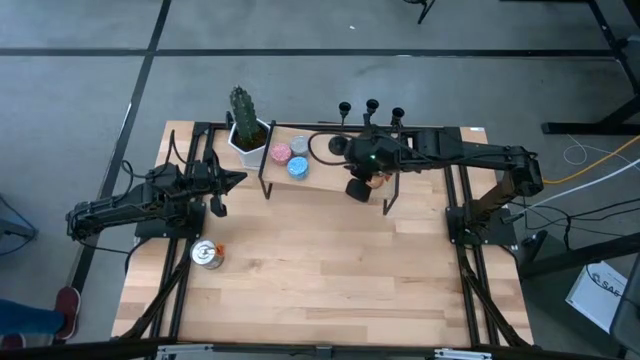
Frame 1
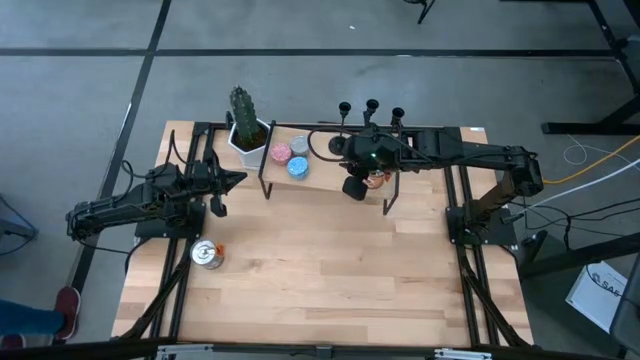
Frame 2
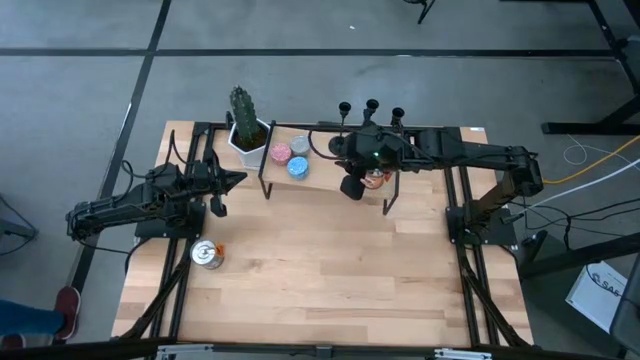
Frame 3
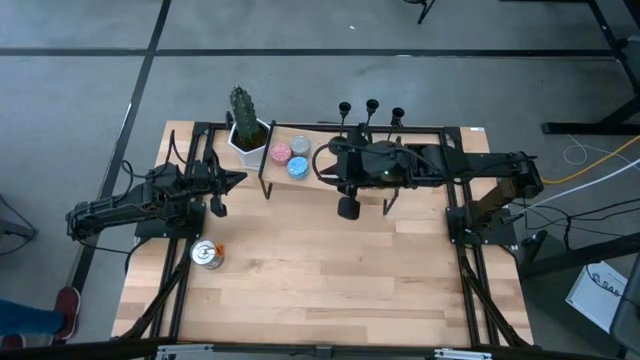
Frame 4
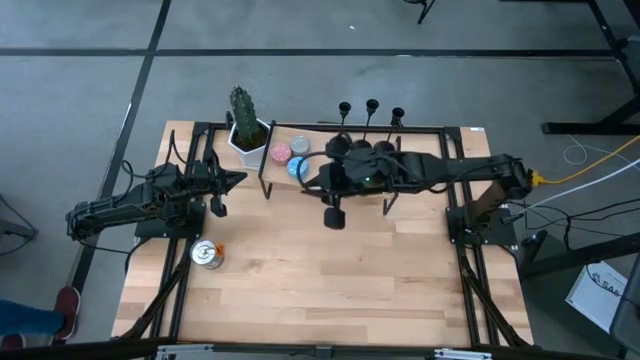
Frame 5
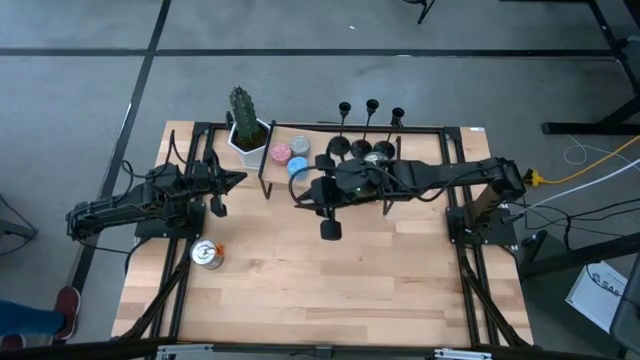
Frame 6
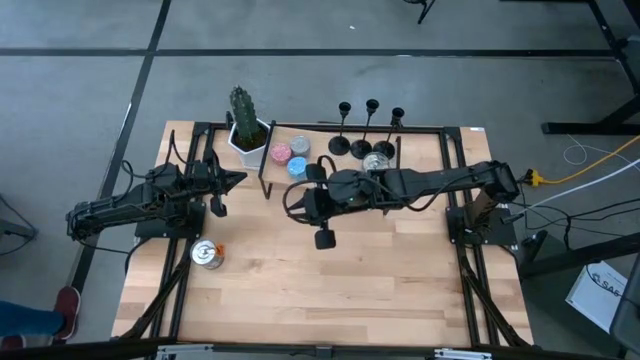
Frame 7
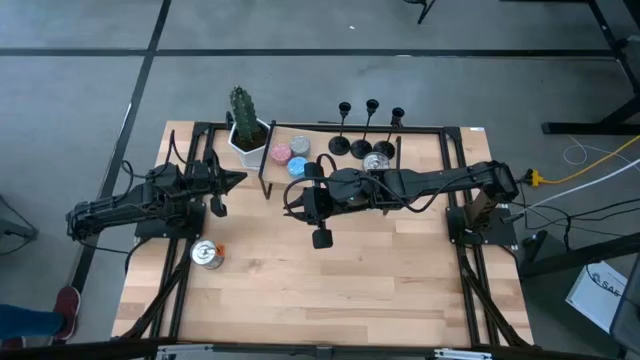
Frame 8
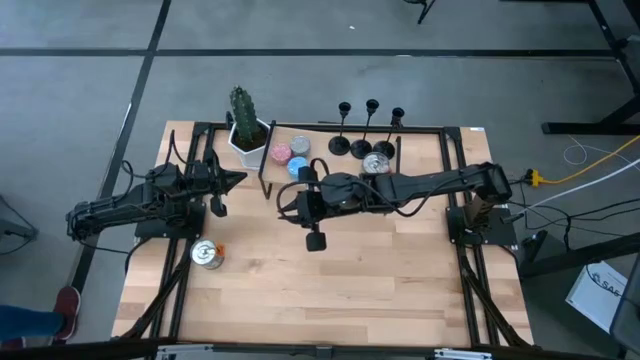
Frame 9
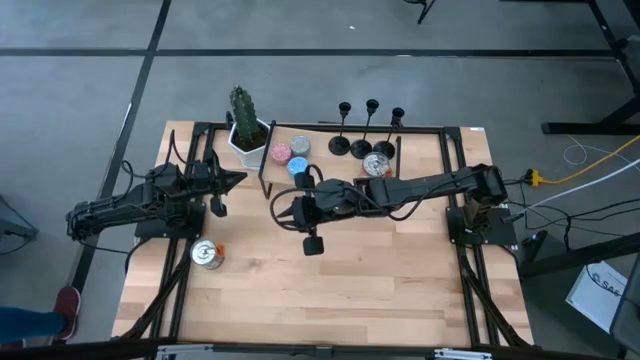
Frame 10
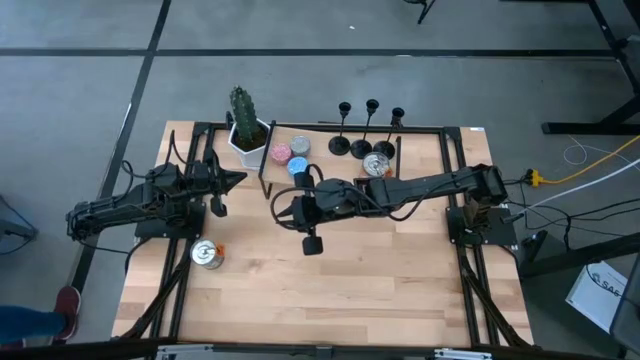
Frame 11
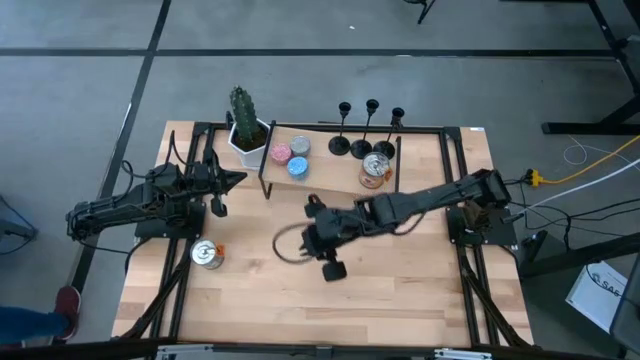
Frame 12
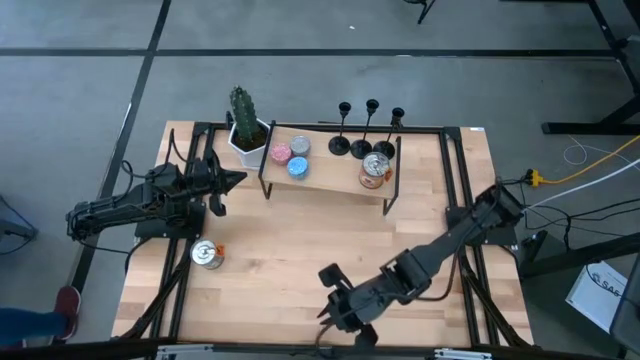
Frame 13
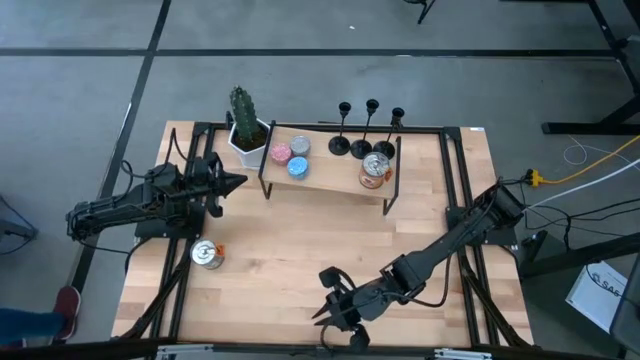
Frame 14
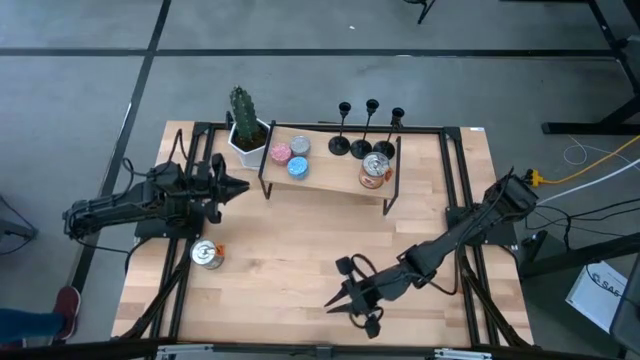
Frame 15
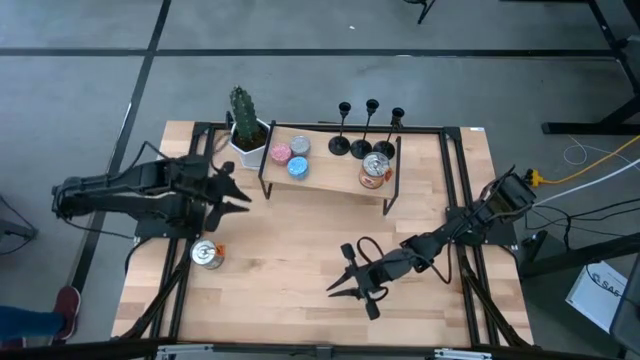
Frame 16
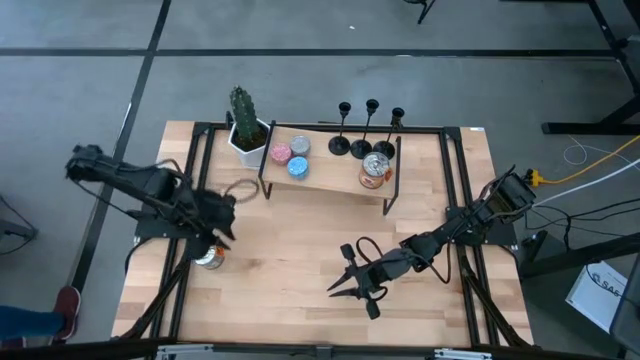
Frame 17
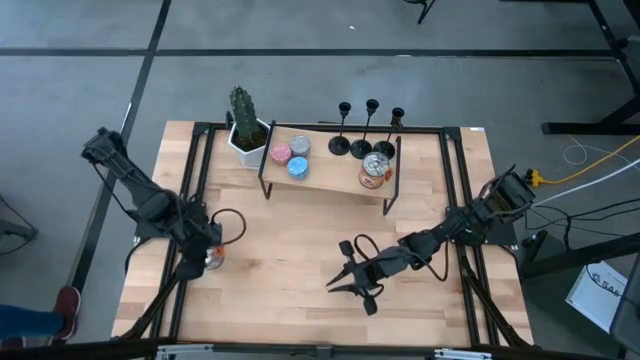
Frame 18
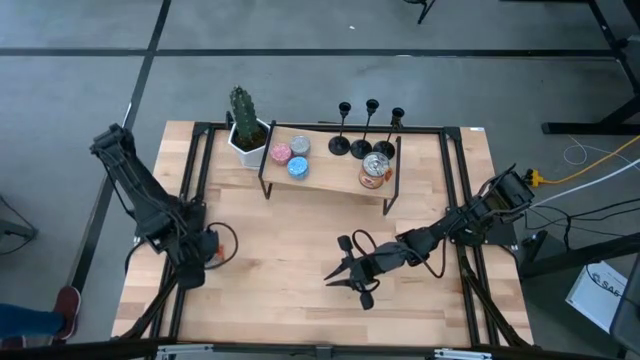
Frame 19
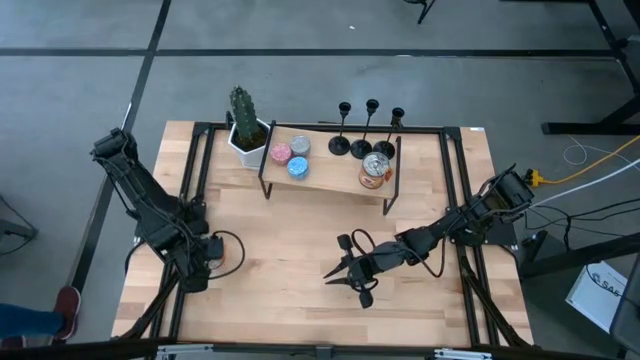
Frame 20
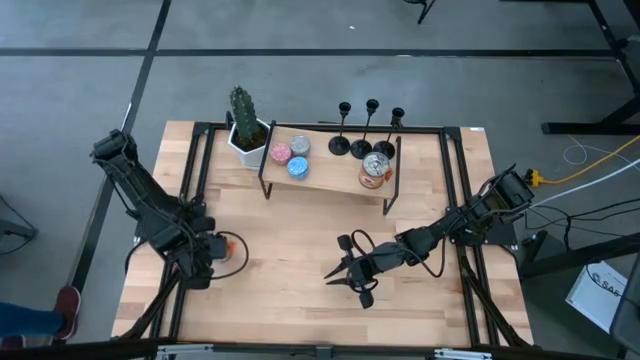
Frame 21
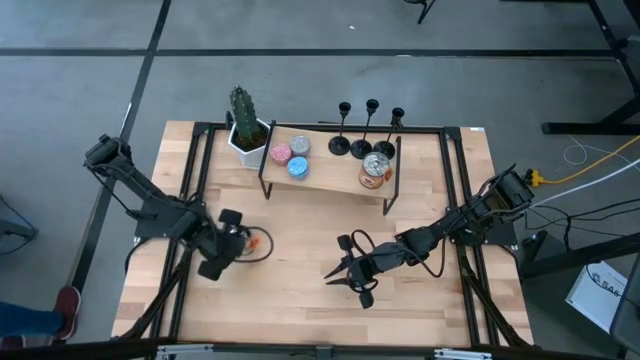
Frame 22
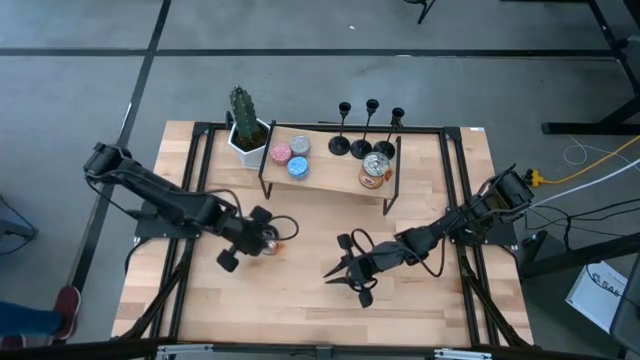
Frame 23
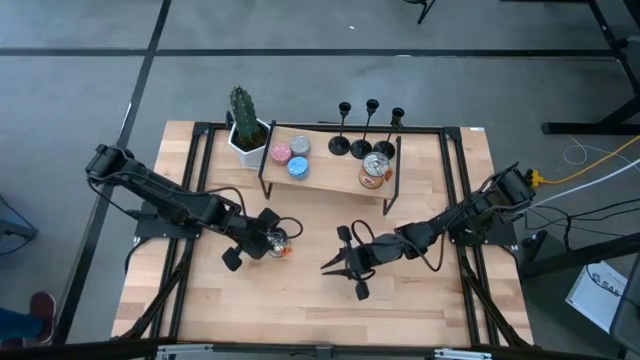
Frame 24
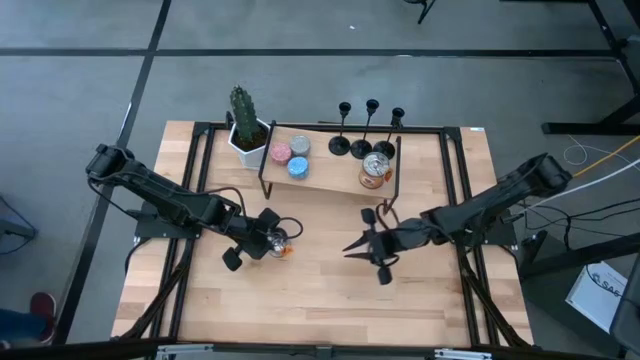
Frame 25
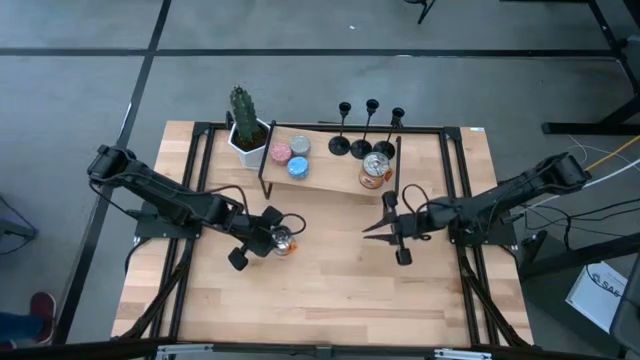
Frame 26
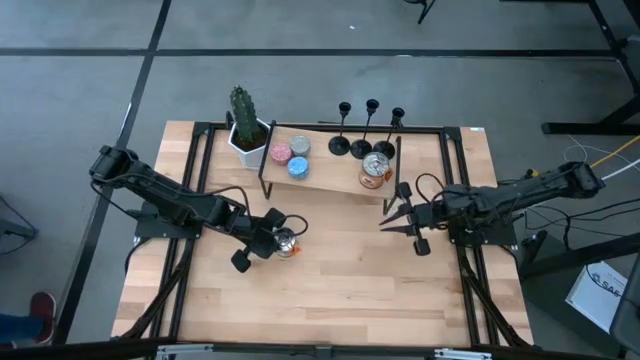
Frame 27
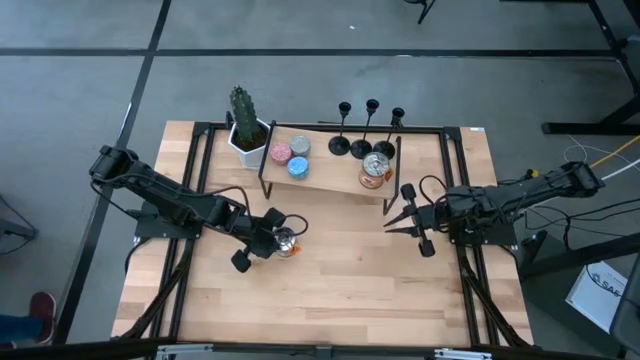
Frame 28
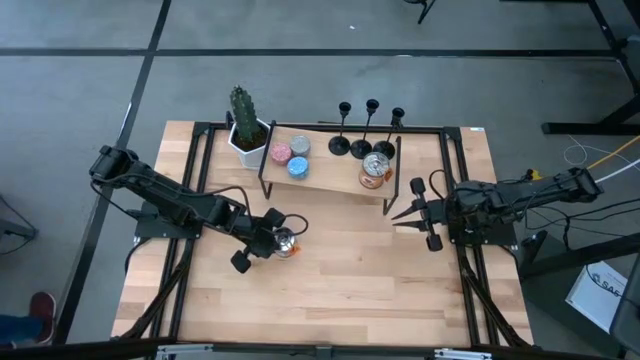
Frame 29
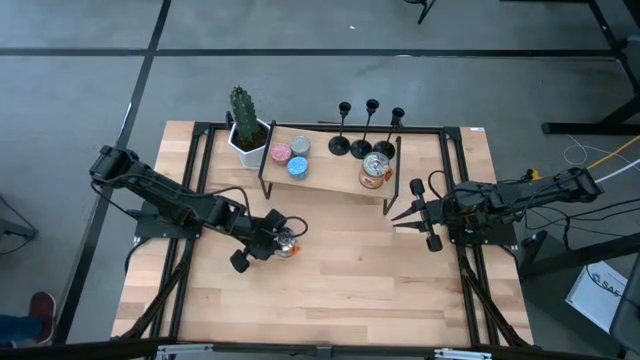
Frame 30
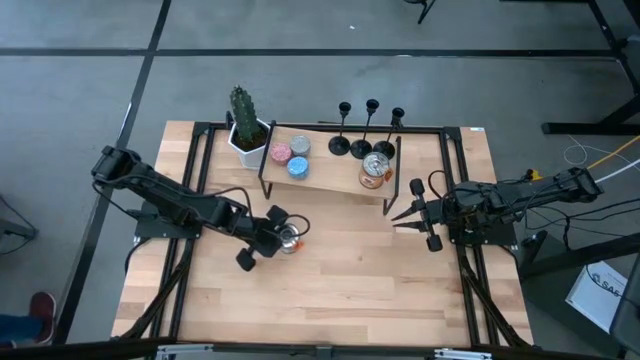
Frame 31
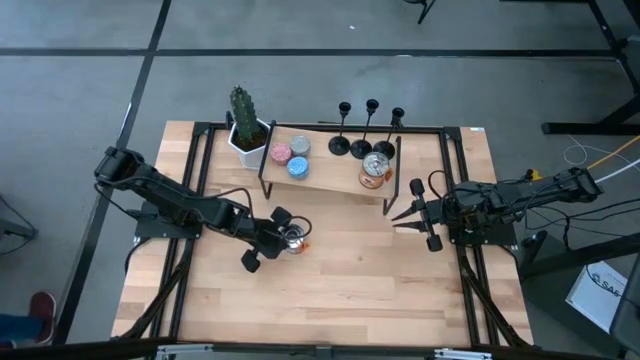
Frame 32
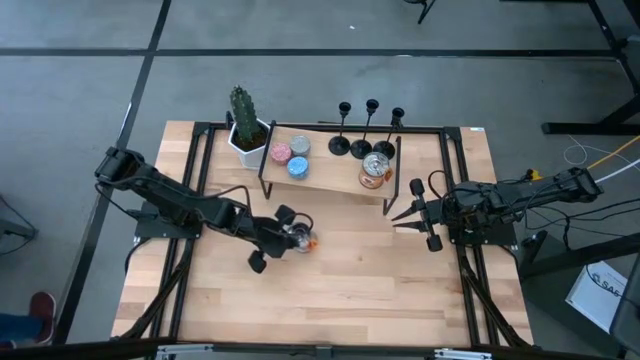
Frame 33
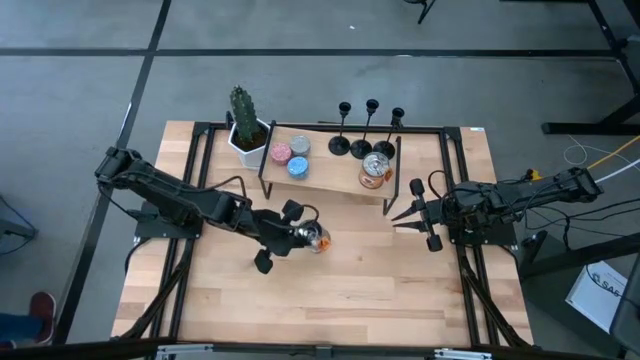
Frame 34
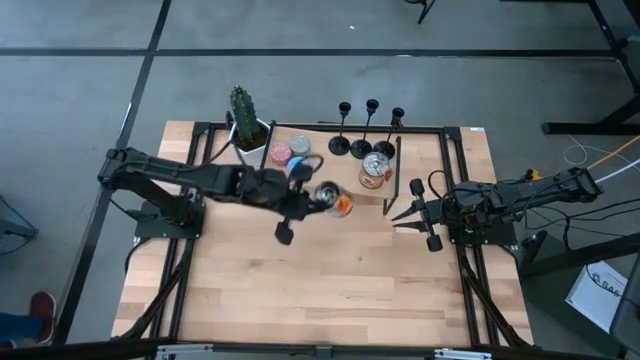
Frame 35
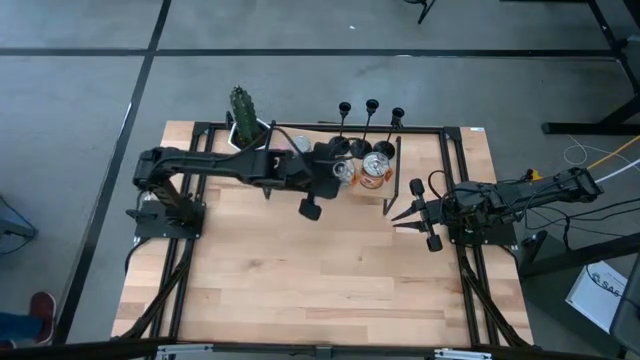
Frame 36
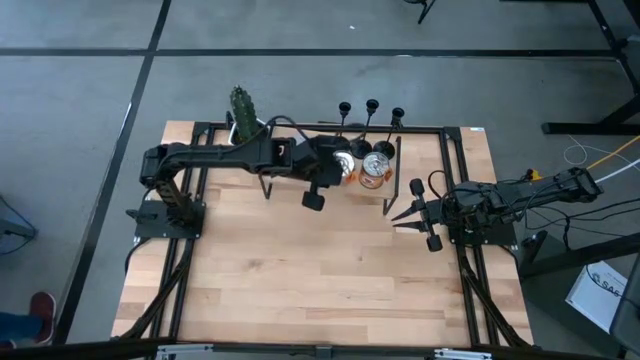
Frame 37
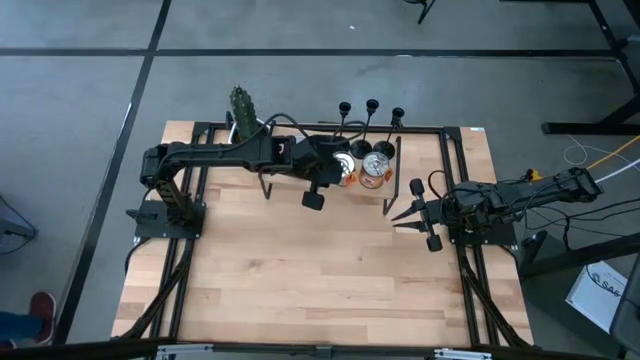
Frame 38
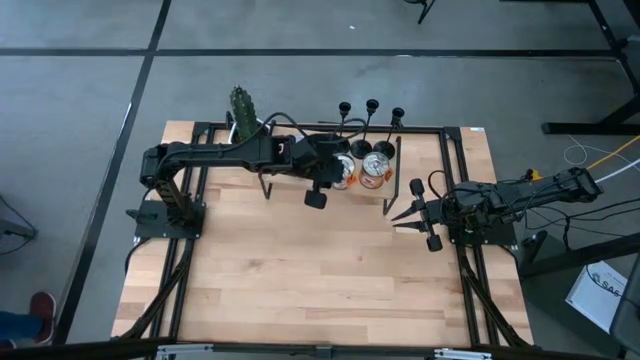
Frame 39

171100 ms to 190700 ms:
Task: Pick & Place candle stick holders
Put the silver scented candle on the shelf

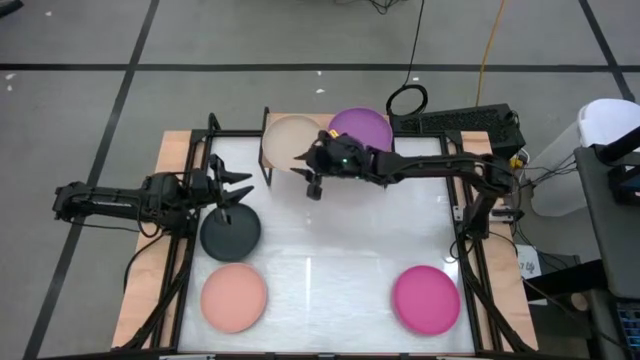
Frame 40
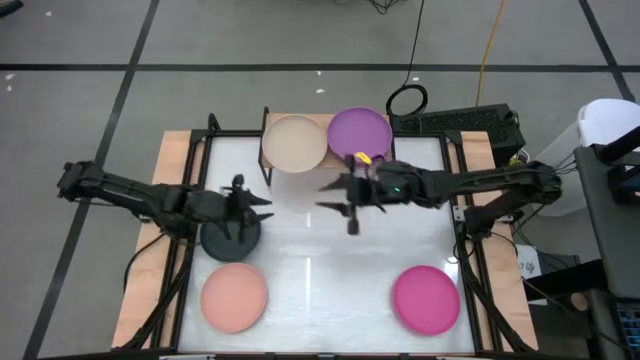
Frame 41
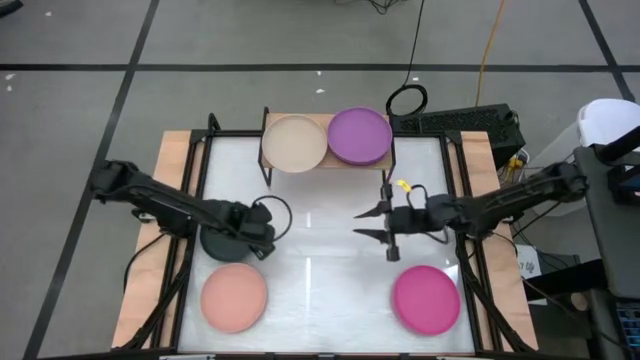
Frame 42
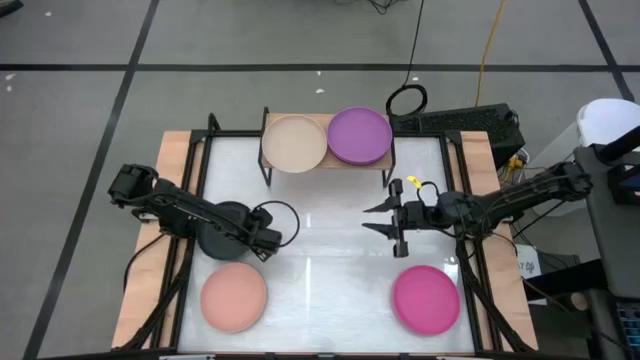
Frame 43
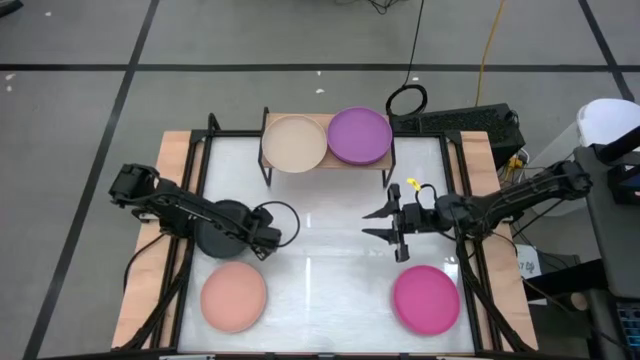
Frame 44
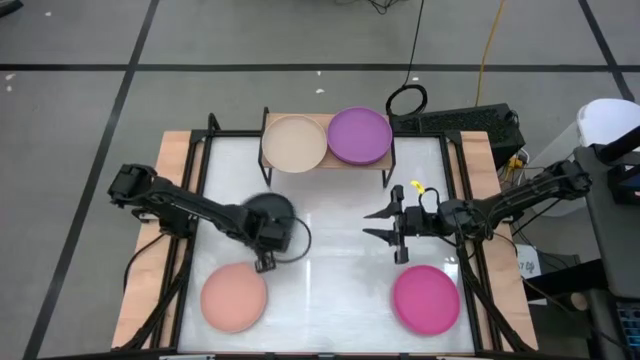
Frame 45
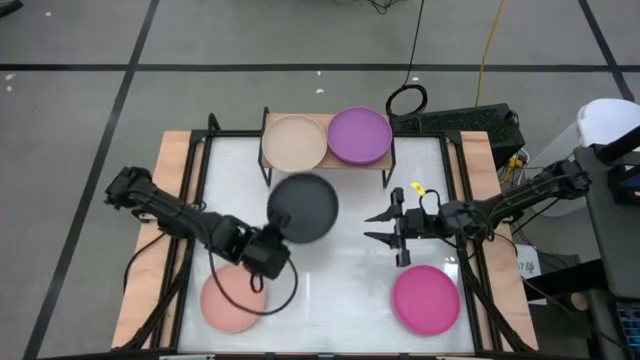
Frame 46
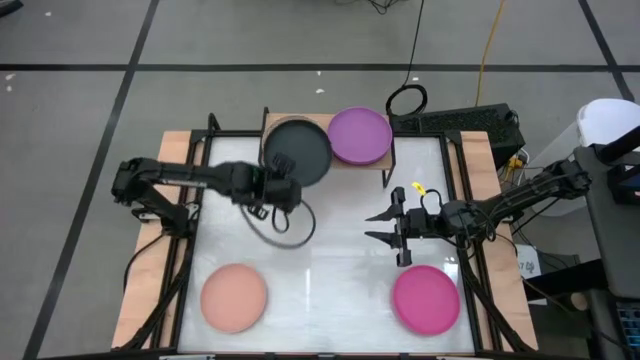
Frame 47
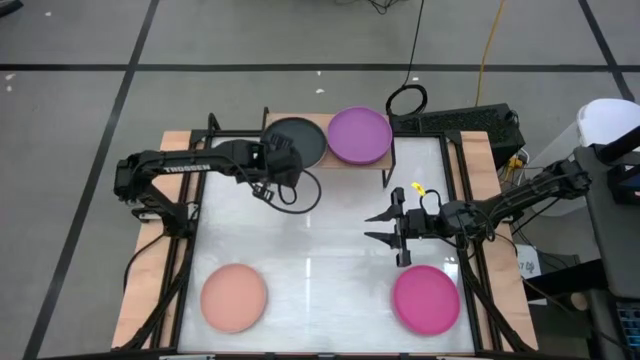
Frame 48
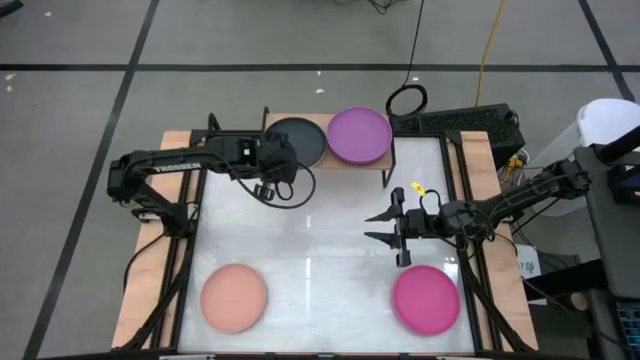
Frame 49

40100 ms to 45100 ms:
Task: Place and stack plates onto a shelf
Stack the black plate on top of the white plate on the shelf
